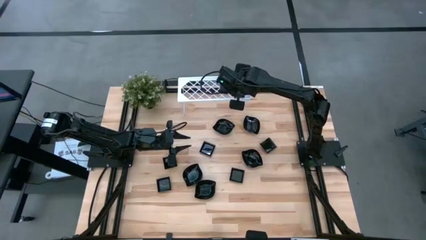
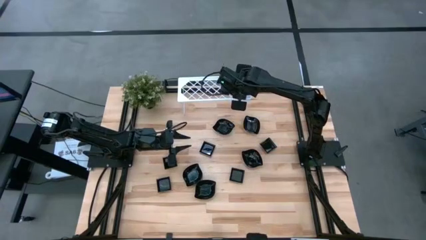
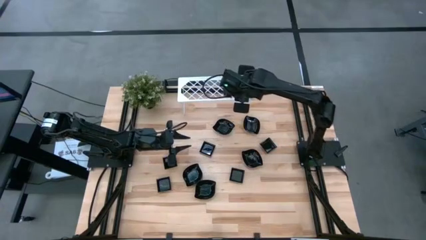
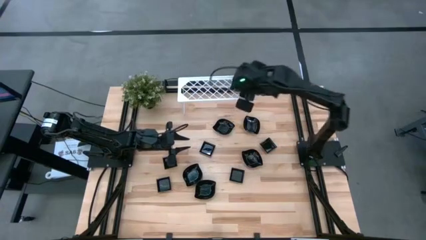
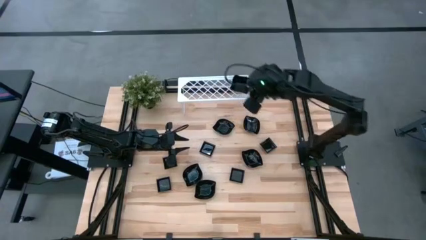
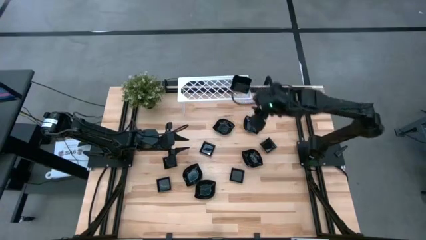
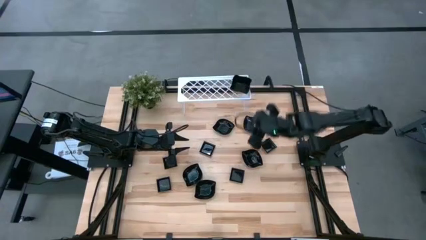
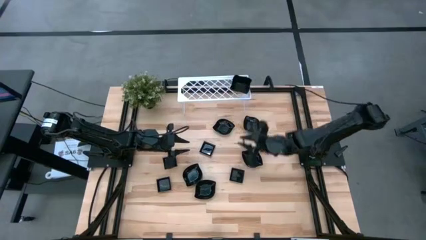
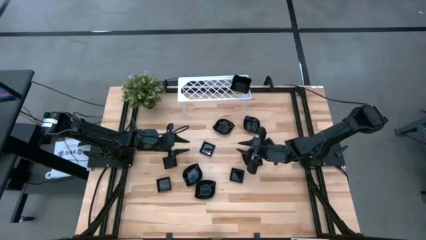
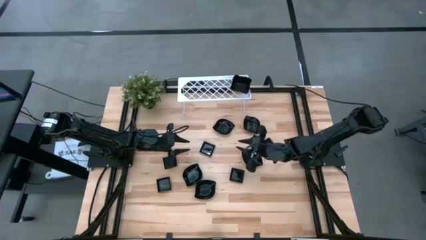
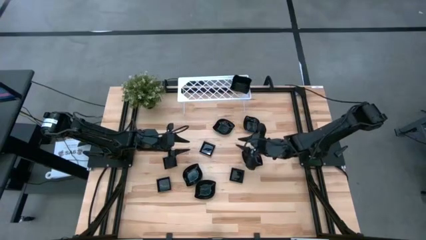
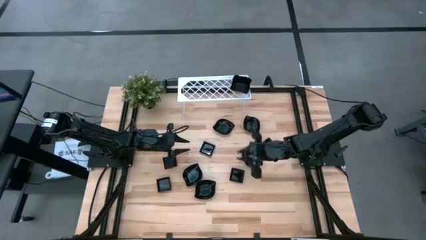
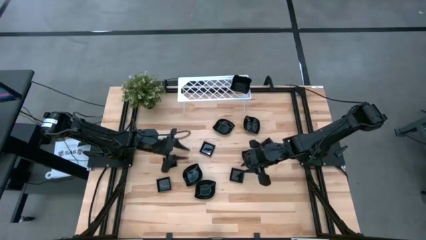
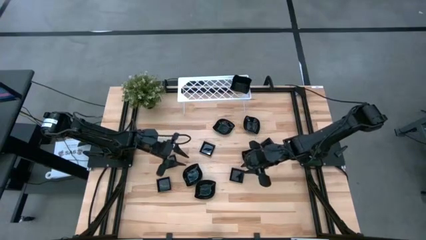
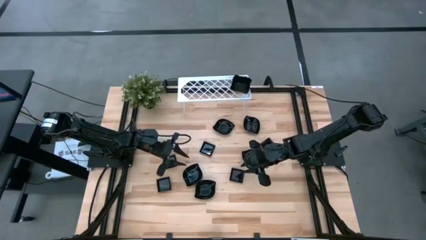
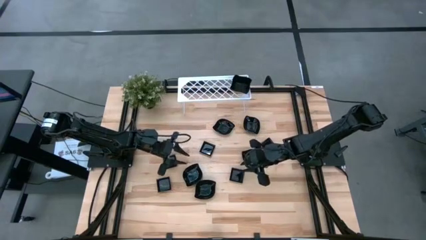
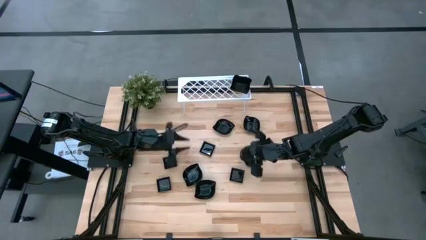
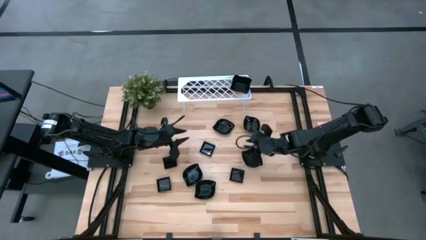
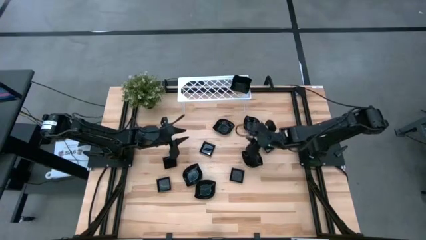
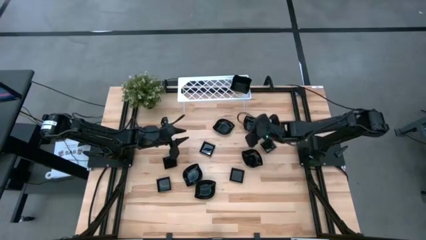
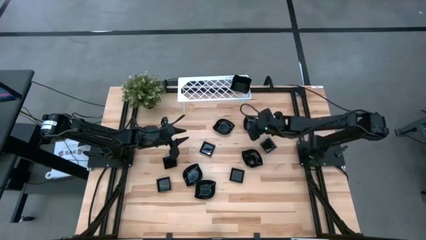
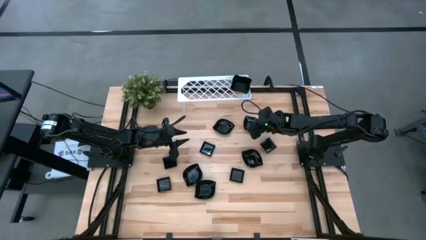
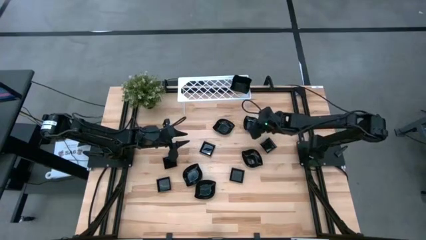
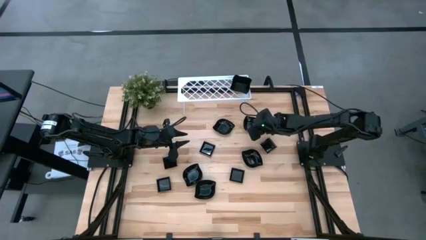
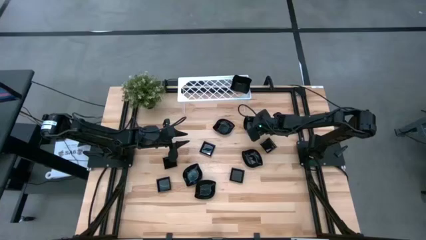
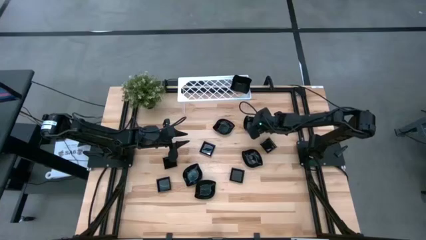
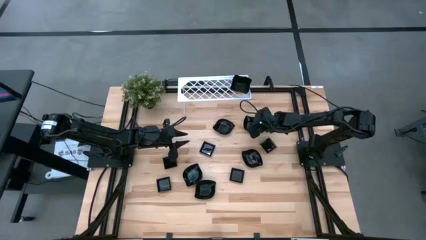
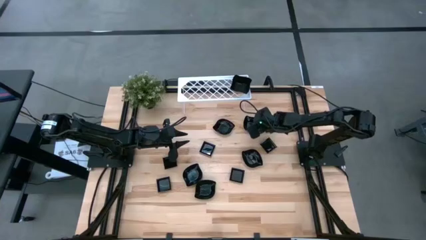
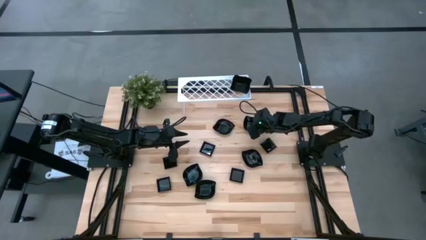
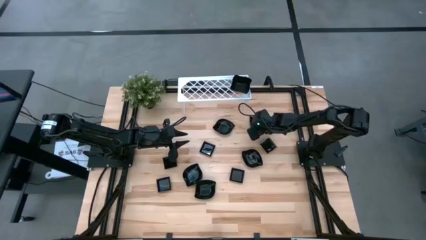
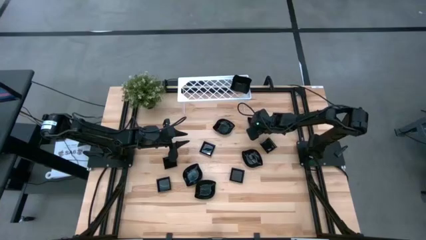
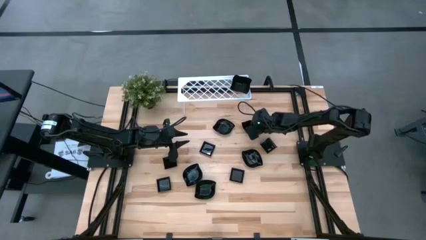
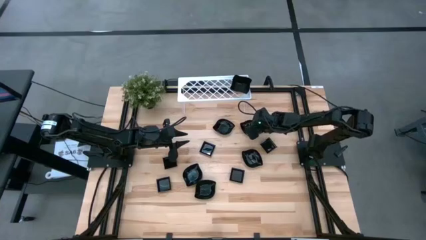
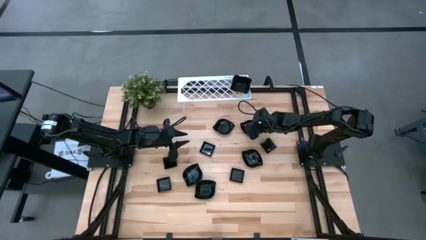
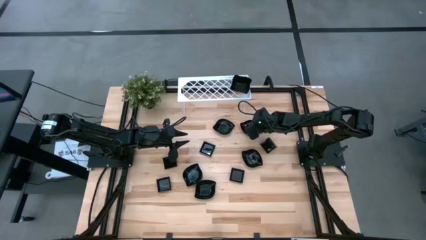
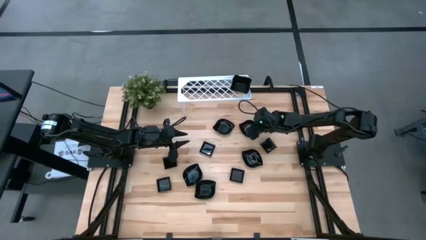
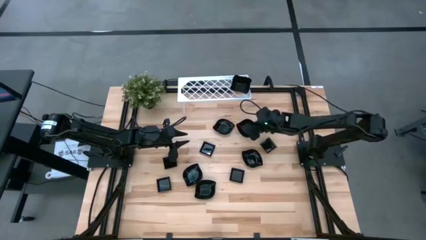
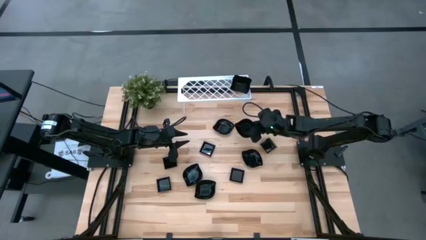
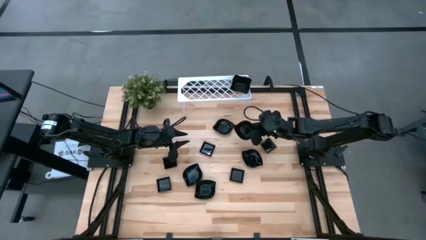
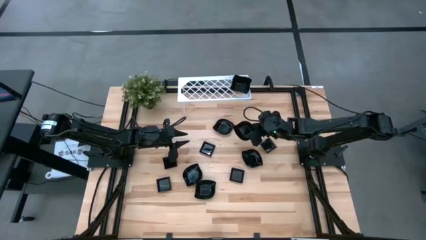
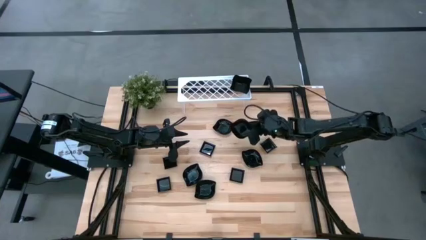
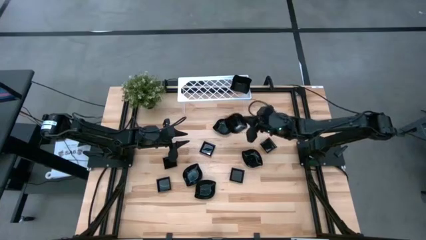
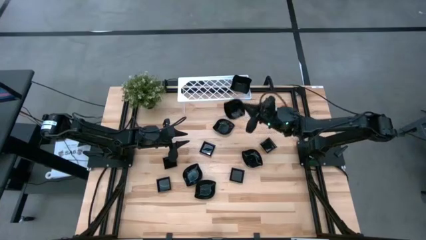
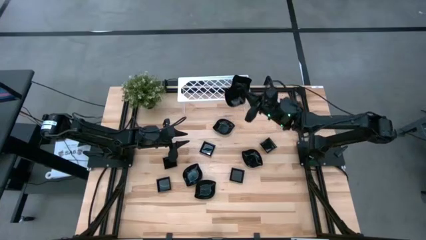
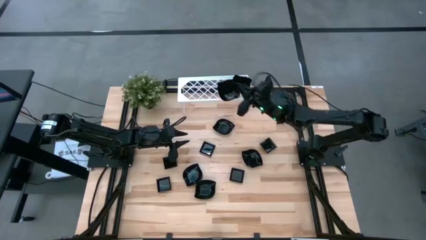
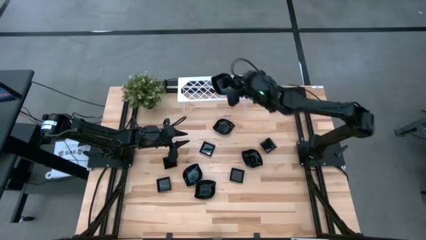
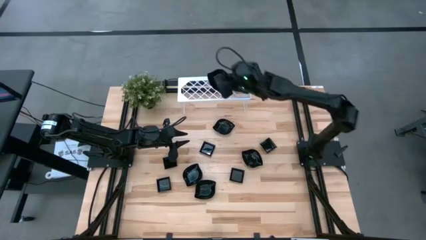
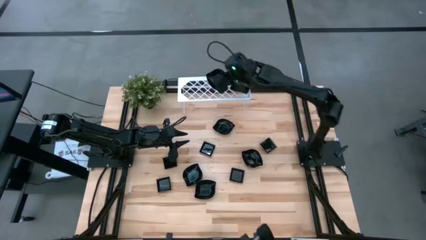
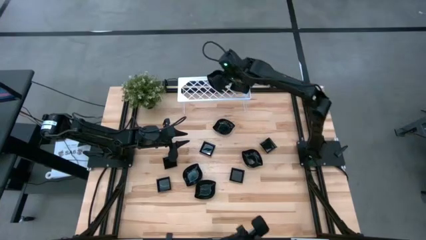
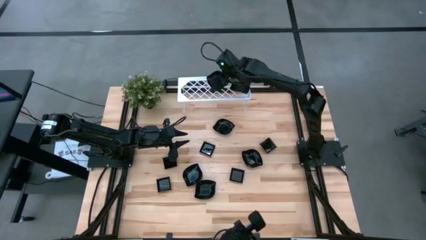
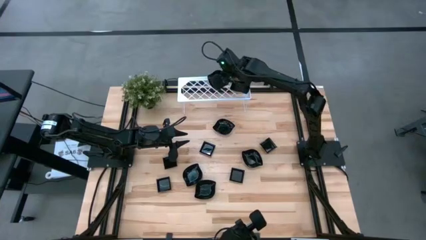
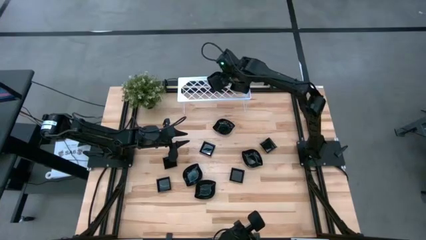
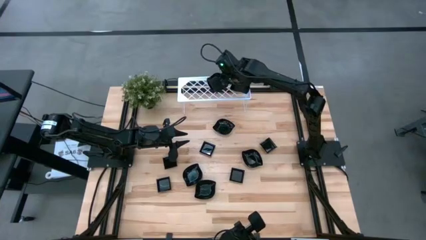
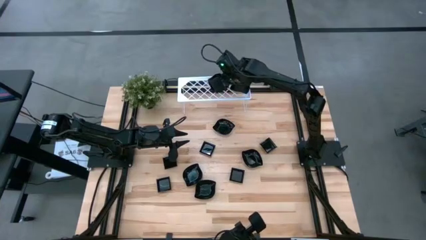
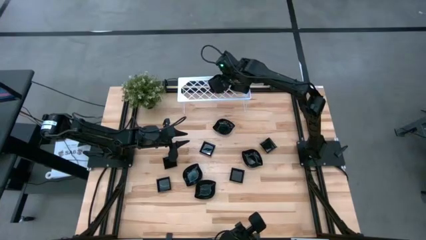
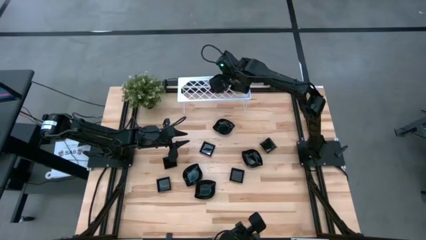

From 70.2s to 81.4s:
Task: Pick & Place Mini shaped plates
Put the black leaf-shaped plate on the shelf
